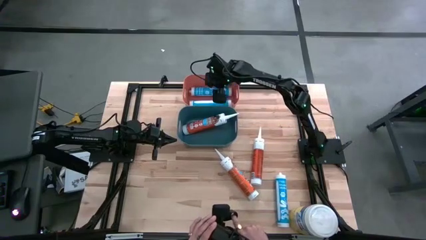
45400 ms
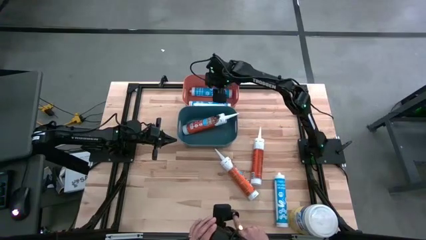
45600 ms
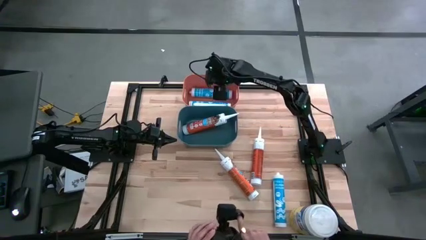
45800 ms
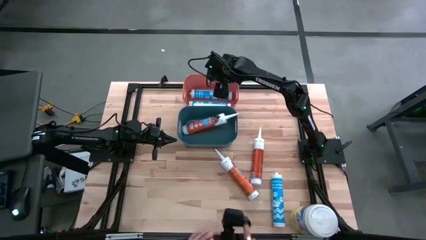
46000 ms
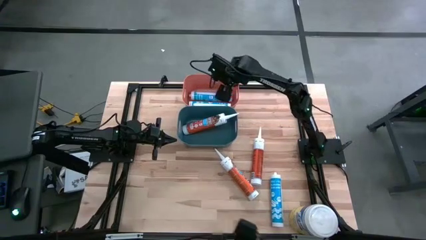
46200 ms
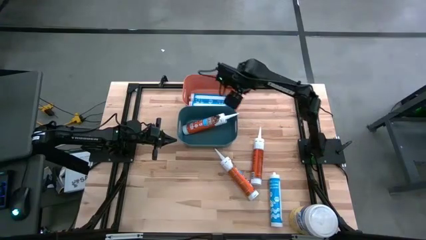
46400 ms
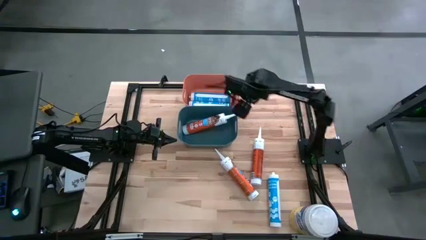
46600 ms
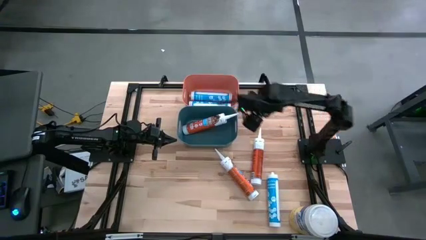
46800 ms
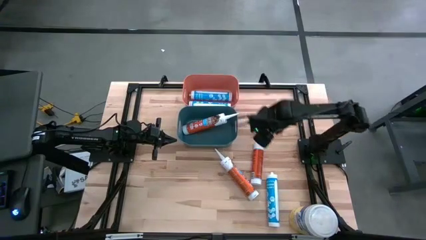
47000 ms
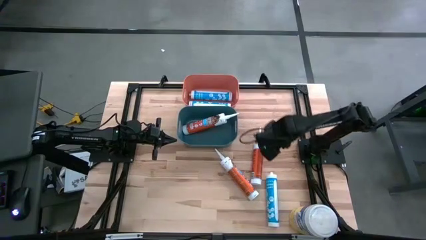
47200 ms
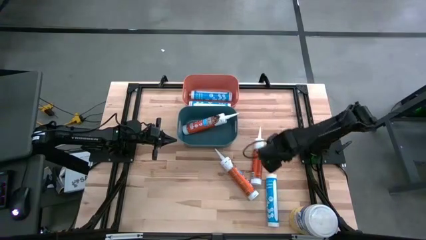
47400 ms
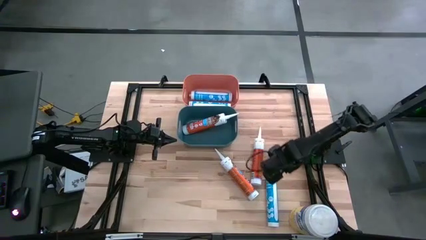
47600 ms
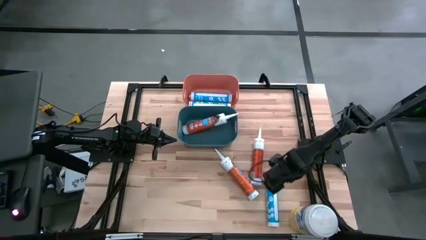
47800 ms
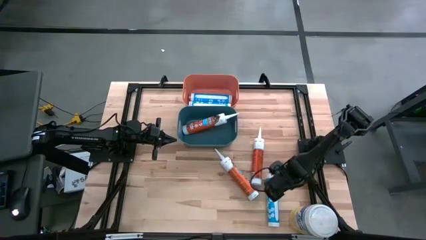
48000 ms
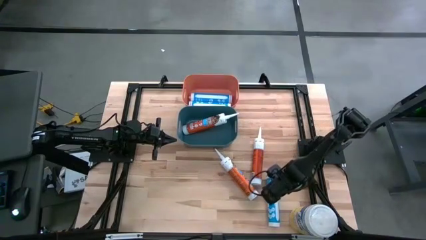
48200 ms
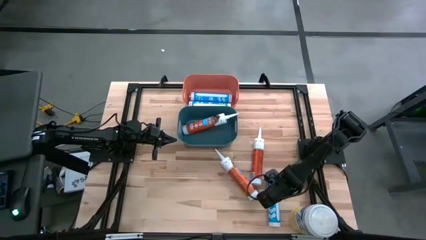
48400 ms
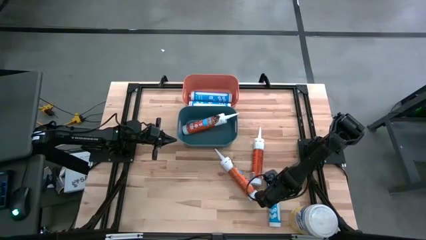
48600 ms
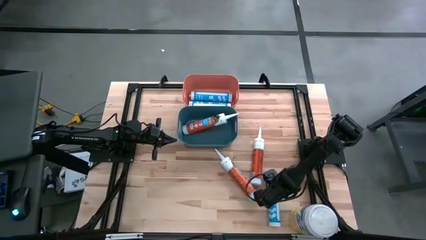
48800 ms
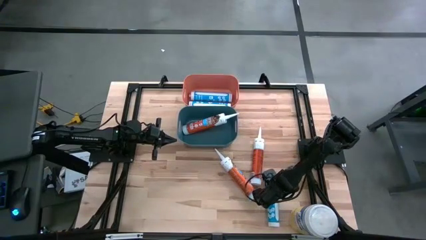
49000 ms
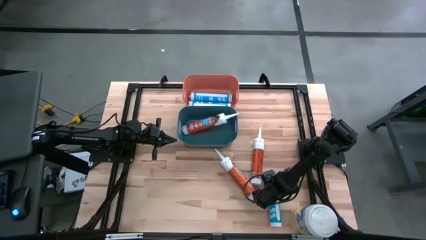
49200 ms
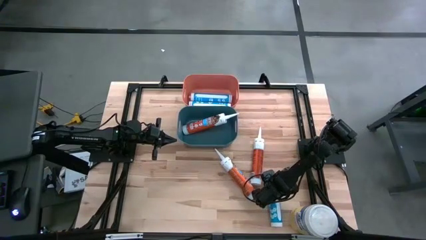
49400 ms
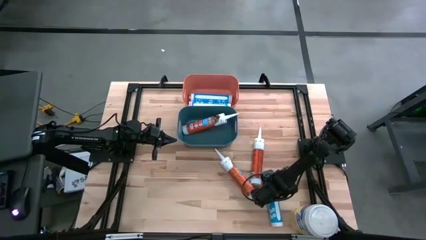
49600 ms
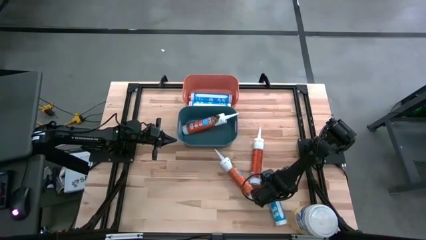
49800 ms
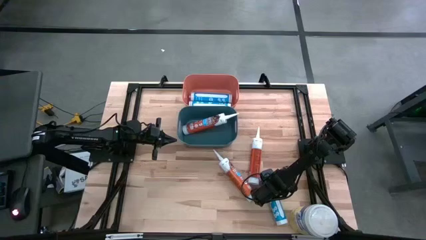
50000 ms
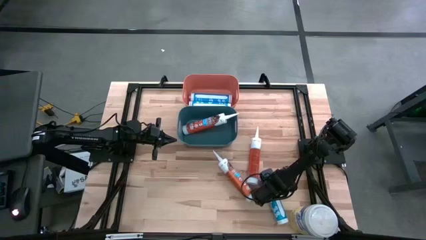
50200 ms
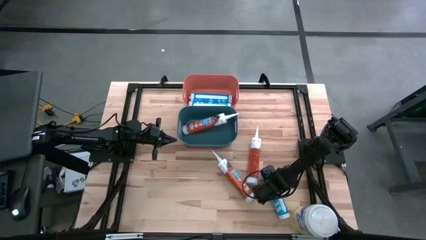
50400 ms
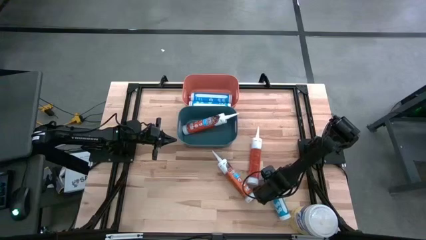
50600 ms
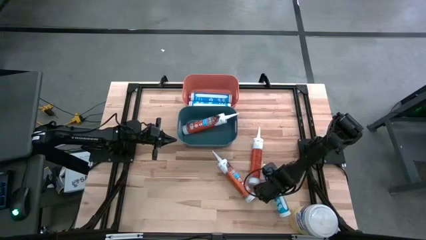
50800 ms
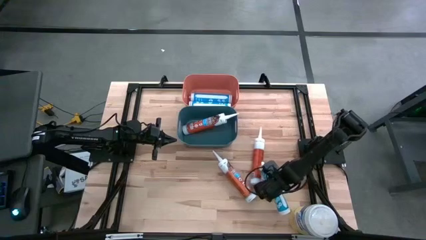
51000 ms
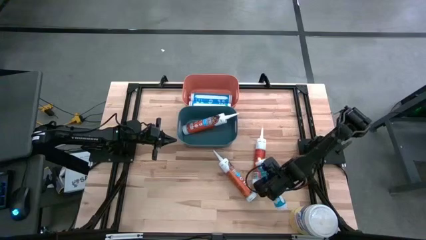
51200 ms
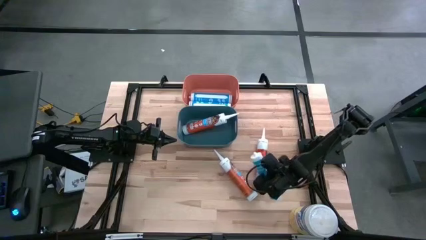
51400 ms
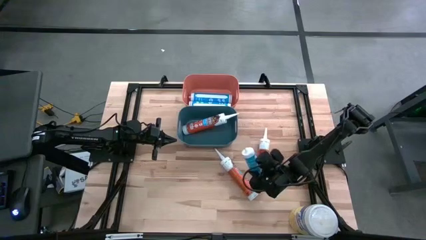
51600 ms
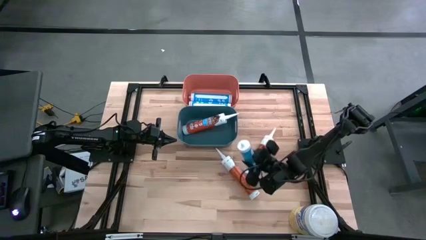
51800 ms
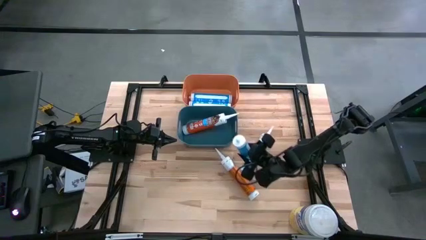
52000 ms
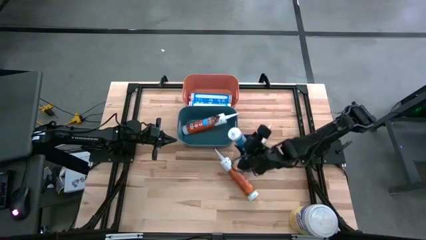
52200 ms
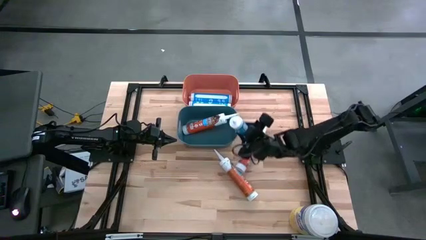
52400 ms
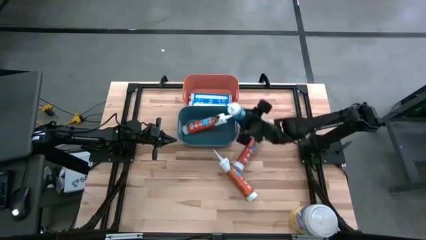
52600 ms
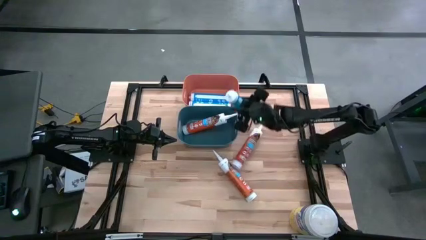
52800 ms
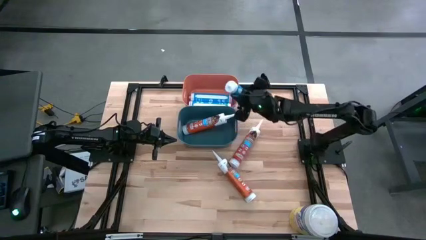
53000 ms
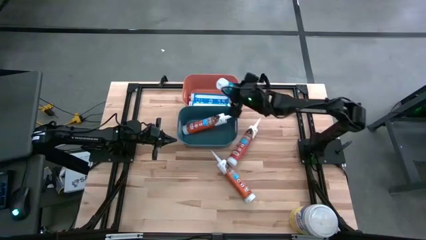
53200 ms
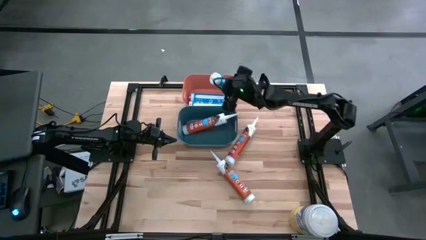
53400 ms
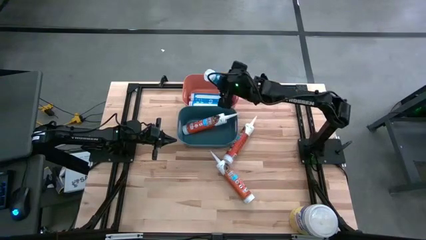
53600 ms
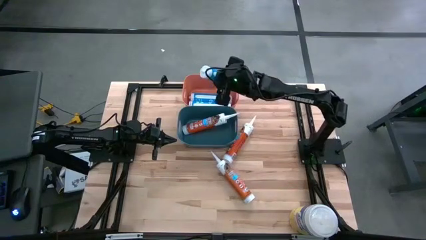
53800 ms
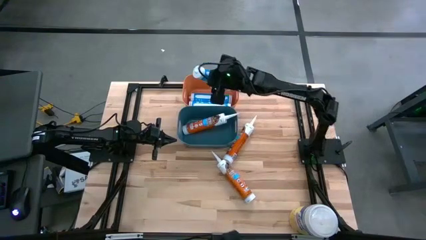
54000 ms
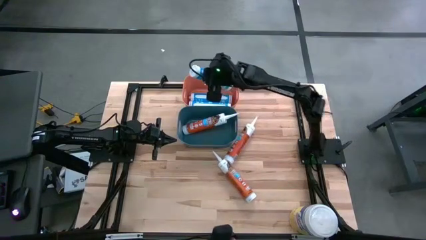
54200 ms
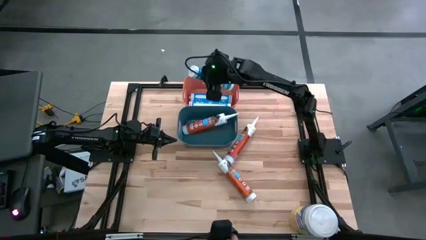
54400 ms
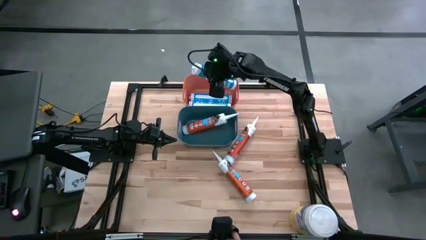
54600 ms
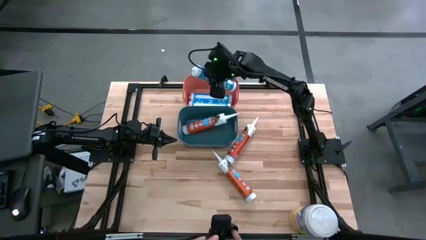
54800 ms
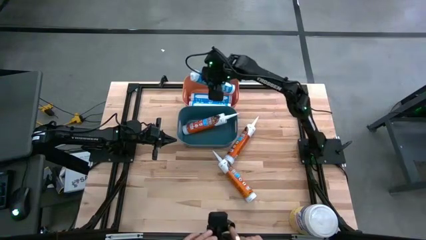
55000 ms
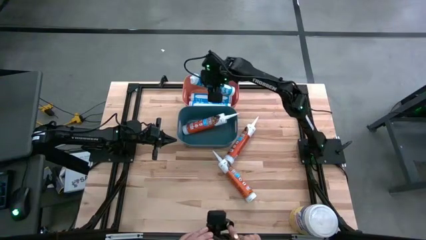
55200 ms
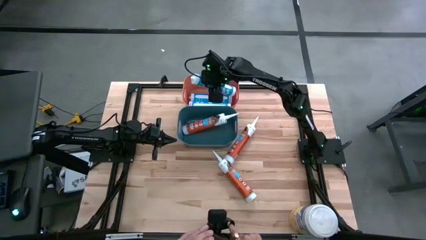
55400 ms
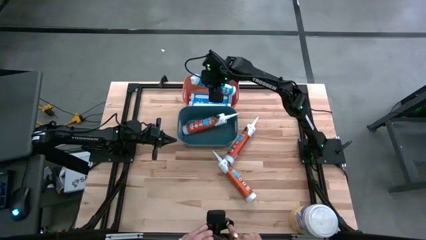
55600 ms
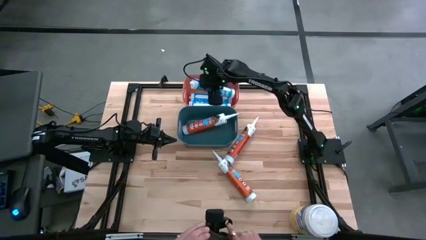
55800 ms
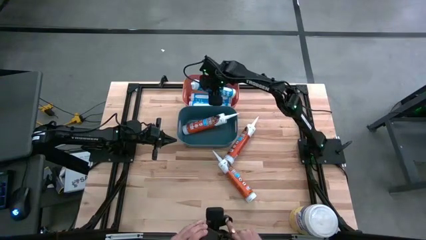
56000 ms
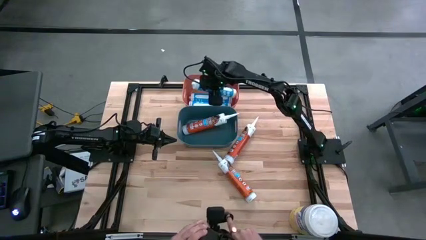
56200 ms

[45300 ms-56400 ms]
Task: Pick & place silicon tubes, Sealant and Lysol wipes
Put the blue sealant into the orange bin

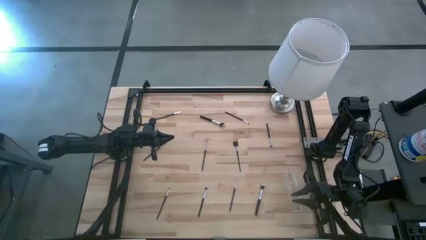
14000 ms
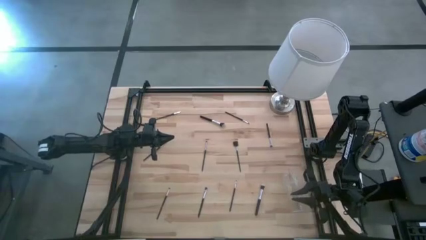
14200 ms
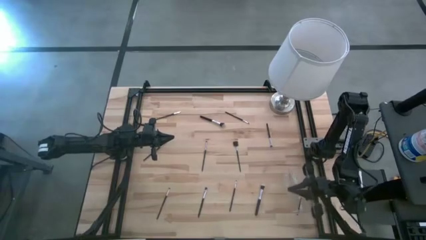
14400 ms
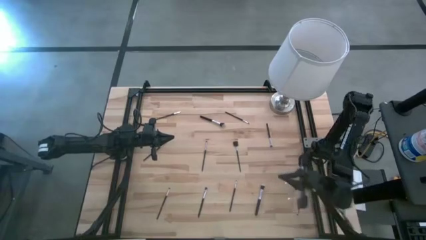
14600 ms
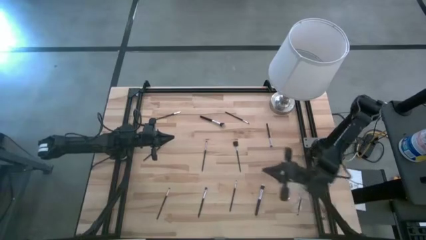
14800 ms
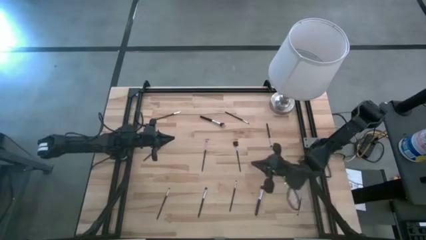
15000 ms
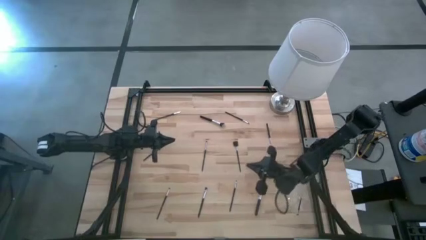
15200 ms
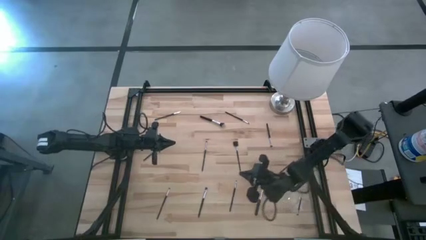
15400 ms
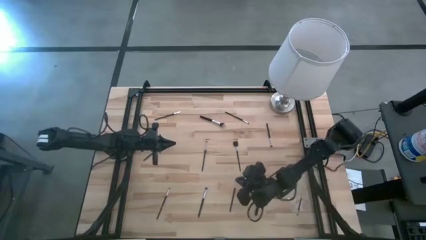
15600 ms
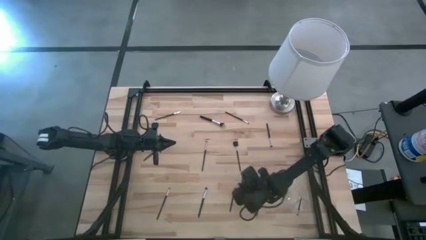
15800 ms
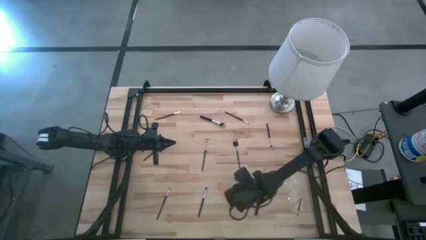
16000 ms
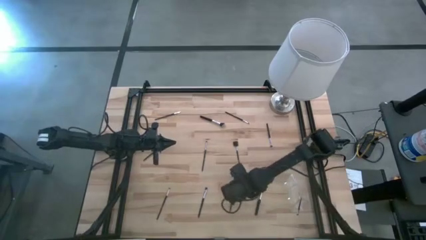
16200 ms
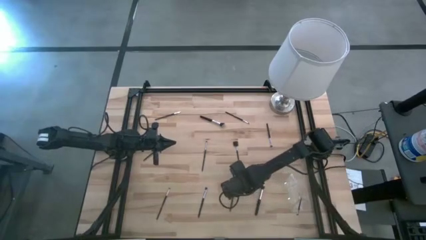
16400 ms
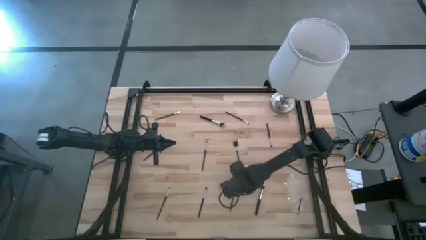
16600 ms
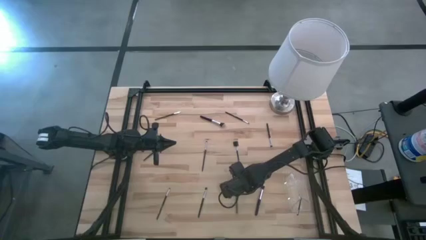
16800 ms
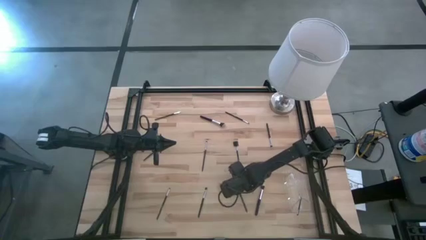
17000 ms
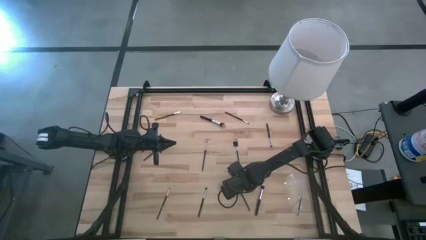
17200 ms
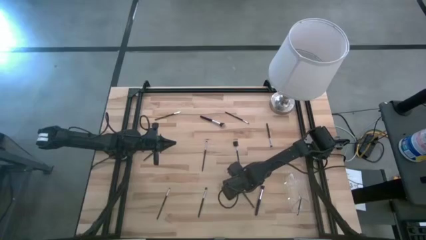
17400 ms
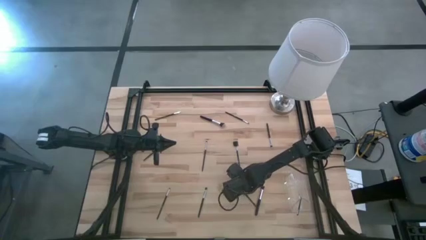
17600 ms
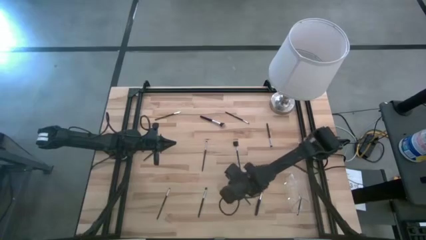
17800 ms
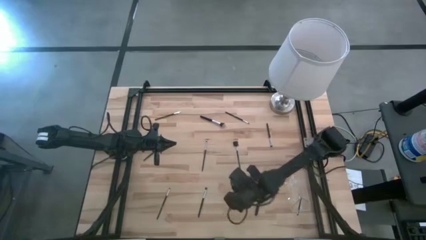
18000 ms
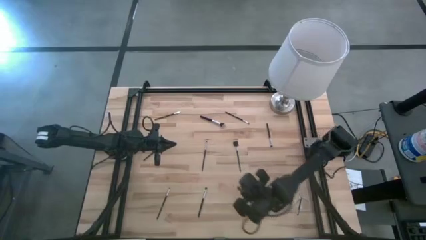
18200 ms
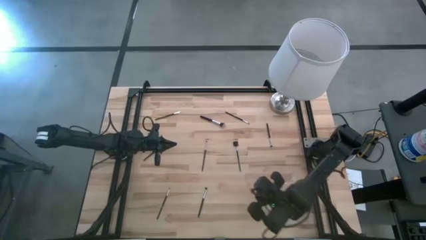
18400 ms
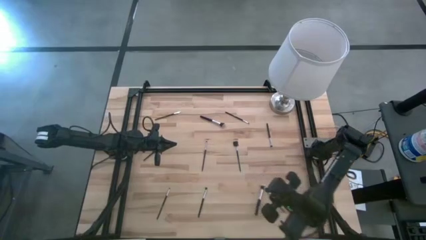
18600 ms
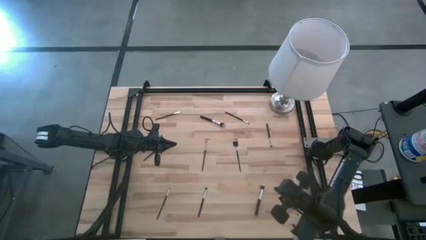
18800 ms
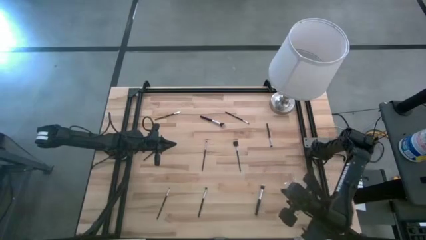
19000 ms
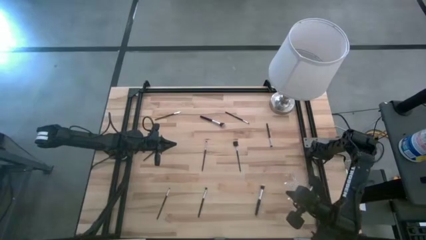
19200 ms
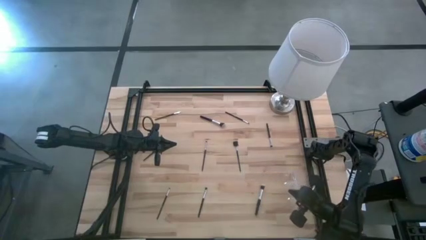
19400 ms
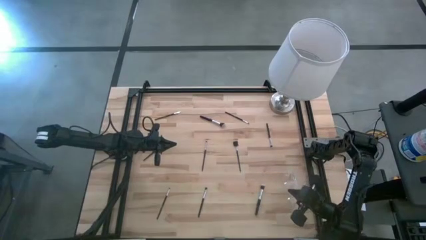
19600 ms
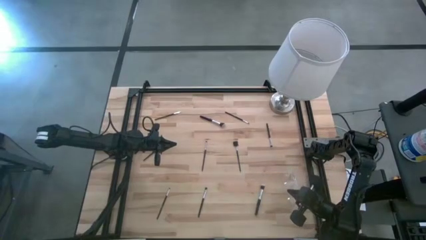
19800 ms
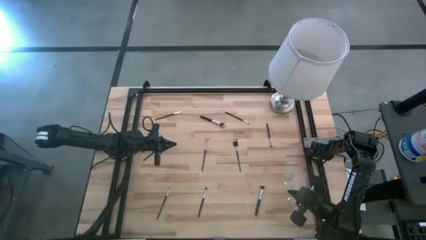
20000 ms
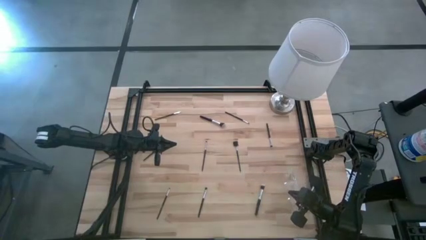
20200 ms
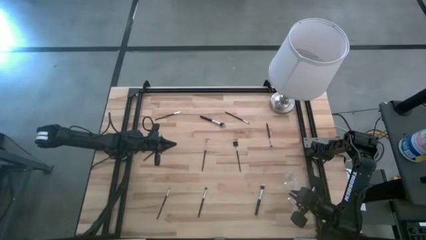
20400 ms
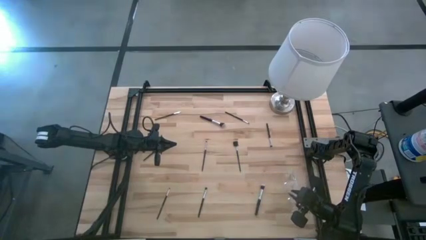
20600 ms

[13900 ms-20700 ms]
Task: Put items in baskets/containers
Put the angled brush into the transparent organizer
